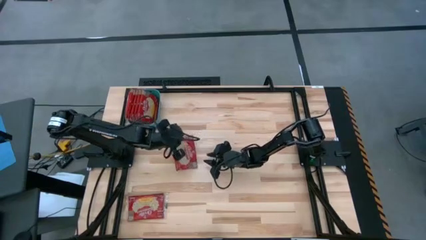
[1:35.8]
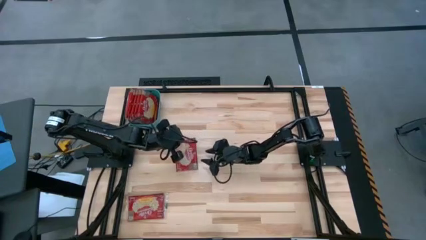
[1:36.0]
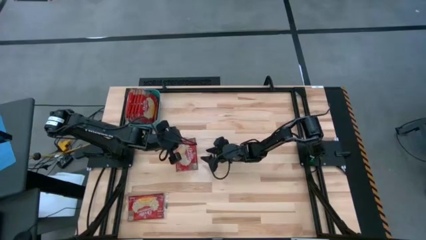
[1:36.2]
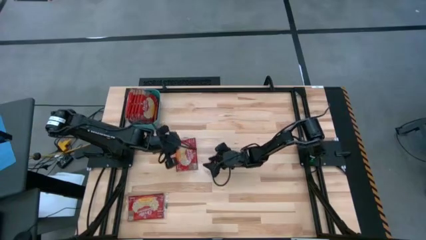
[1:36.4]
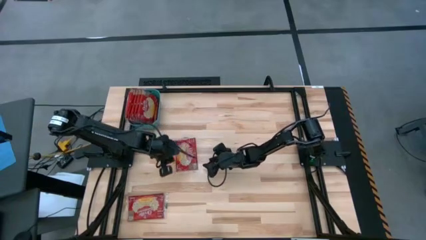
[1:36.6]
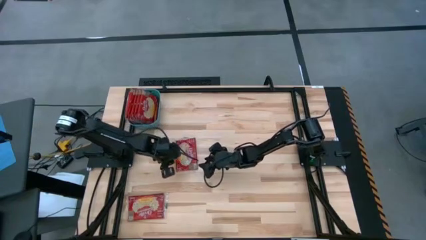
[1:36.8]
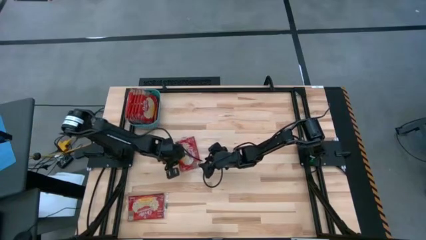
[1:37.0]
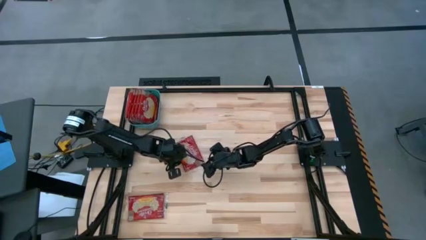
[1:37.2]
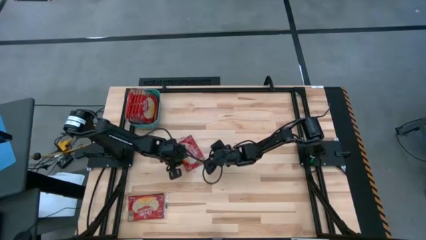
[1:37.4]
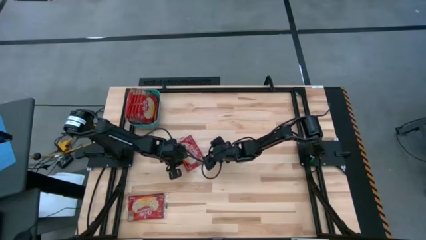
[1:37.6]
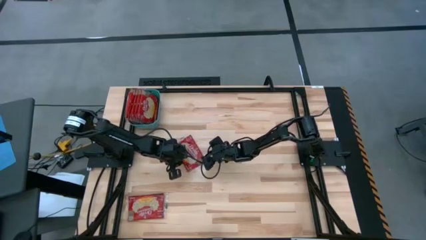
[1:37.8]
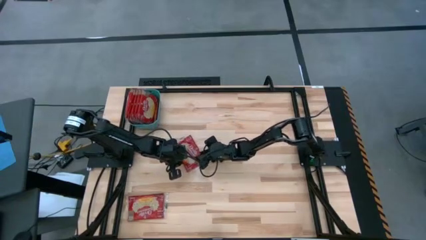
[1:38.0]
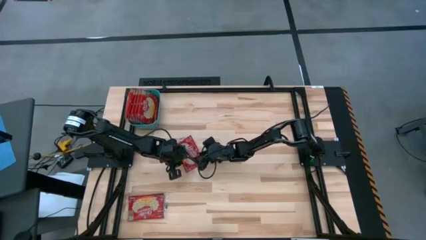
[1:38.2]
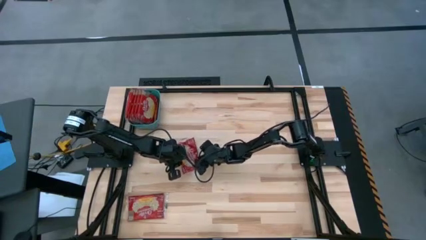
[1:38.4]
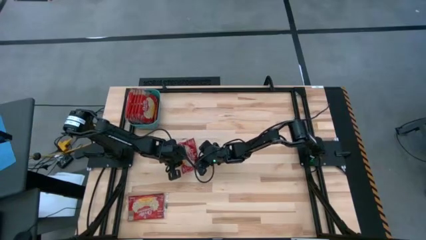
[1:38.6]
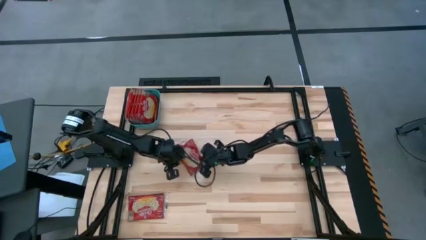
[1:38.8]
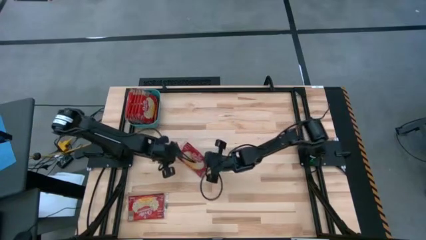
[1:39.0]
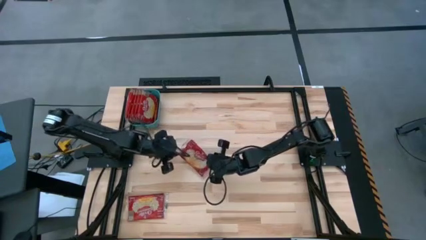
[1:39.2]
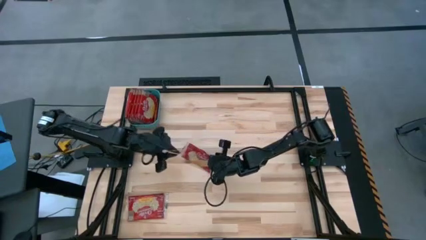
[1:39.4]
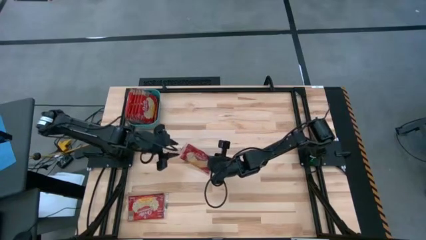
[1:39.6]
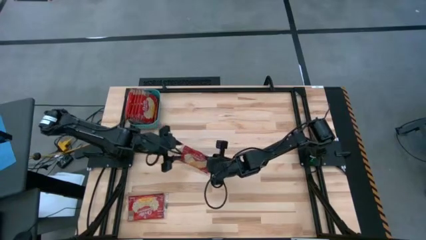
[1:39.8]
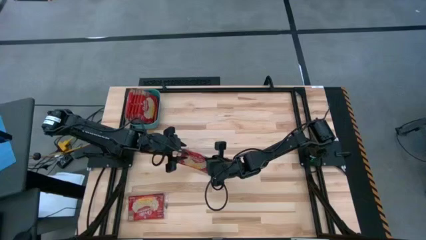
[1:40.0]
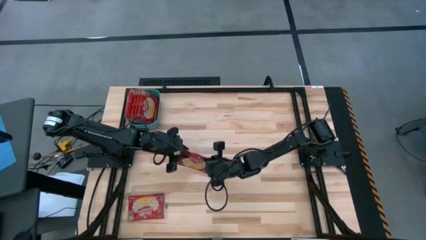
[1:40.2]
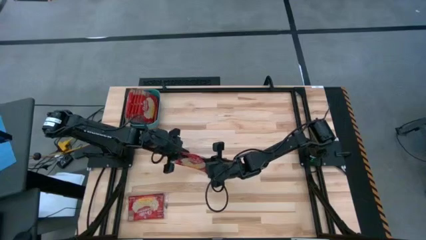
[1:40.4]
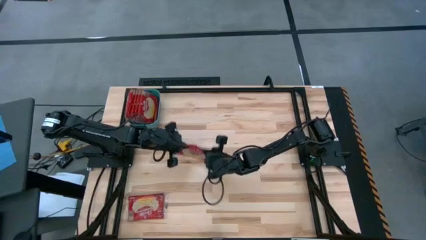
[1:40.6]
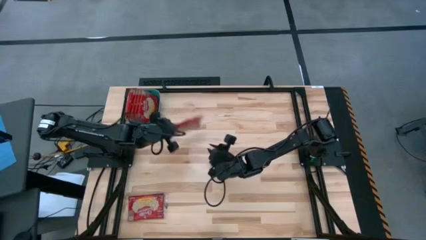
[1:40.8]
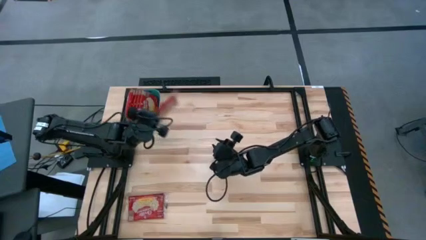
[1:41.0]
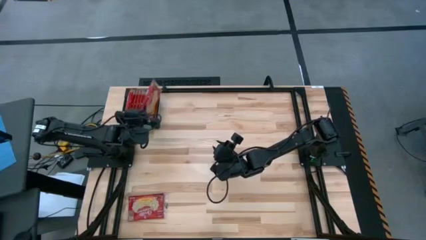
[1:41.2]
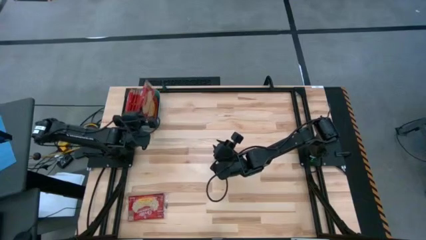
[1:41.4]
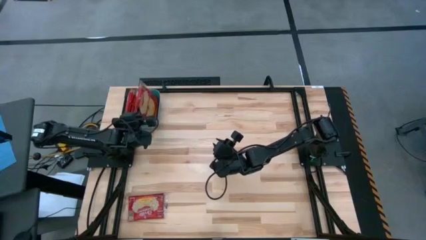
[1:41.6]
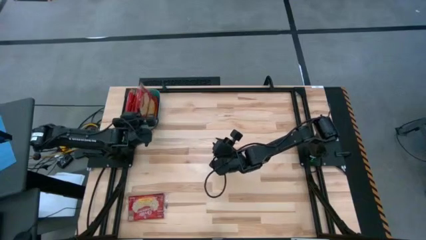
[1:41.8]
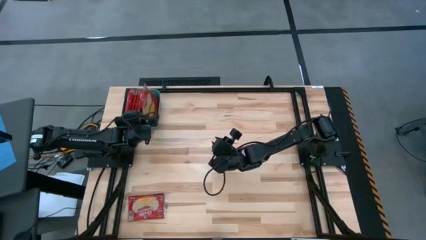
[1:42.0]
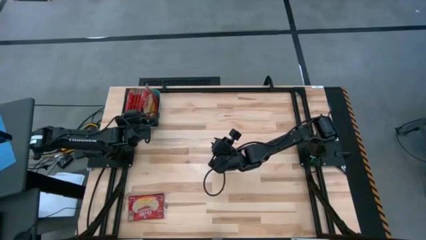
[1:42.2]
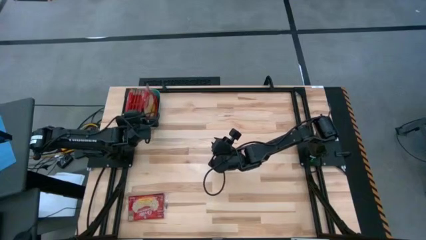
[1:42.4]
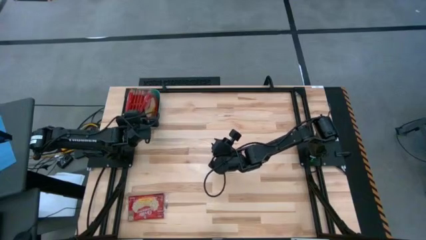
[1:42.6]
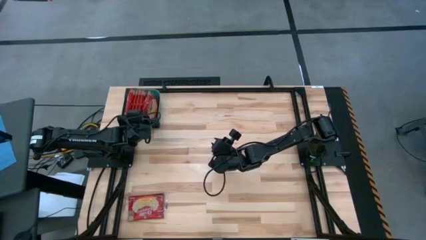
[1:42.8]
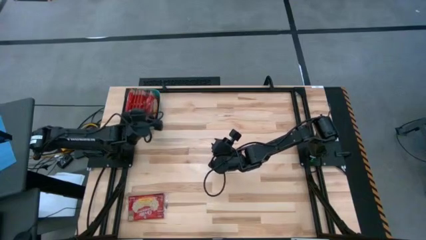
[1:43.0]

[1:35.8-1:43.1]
Task: Sort popcorn bags into baskets
Put the red popcorn bag in the blue bin

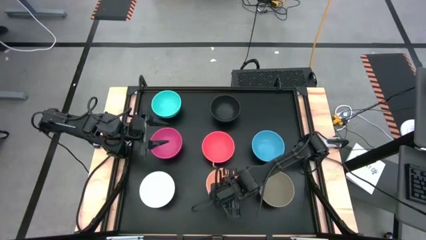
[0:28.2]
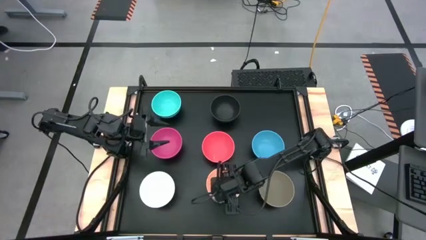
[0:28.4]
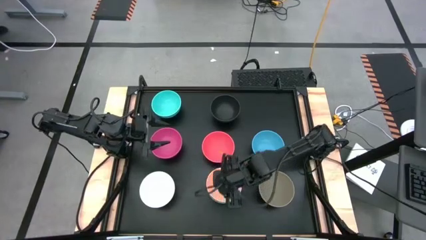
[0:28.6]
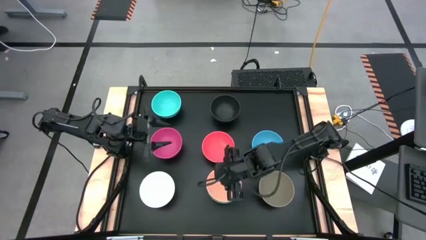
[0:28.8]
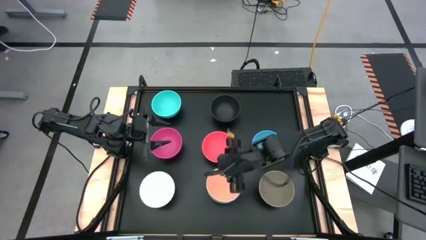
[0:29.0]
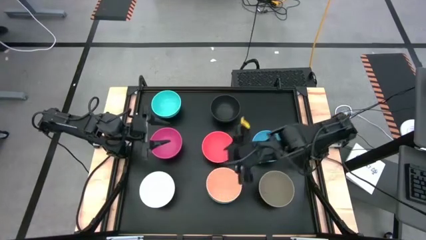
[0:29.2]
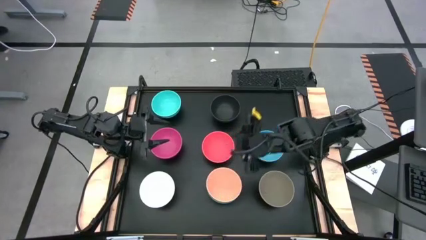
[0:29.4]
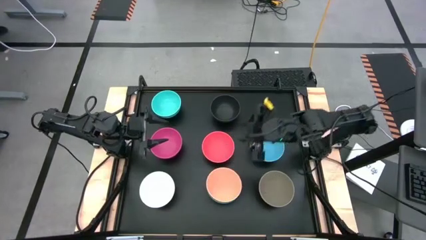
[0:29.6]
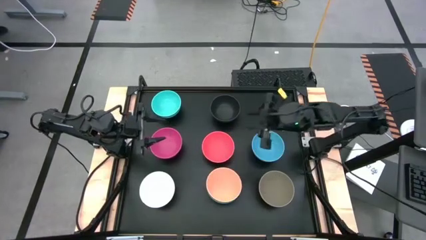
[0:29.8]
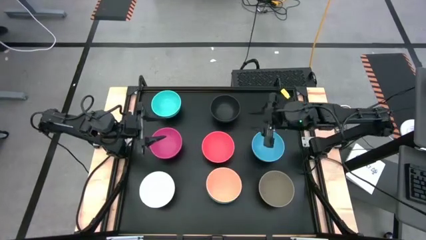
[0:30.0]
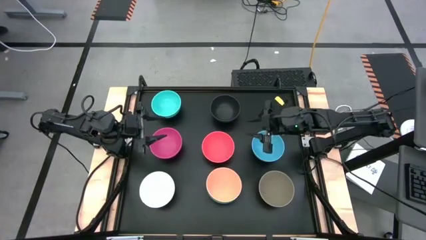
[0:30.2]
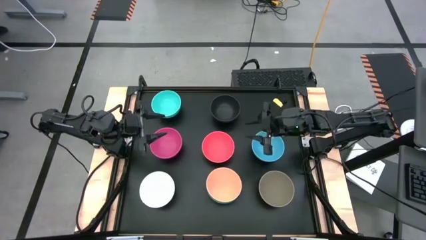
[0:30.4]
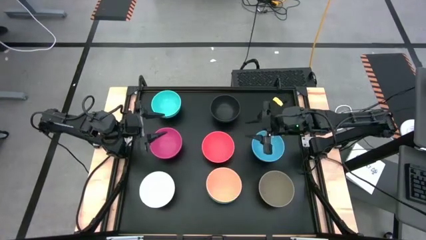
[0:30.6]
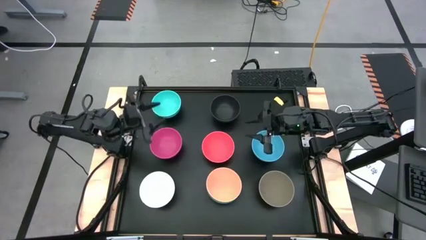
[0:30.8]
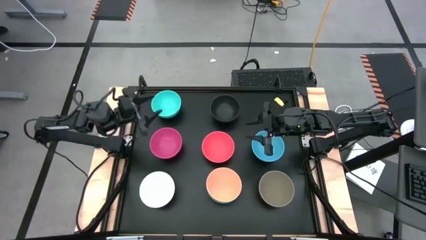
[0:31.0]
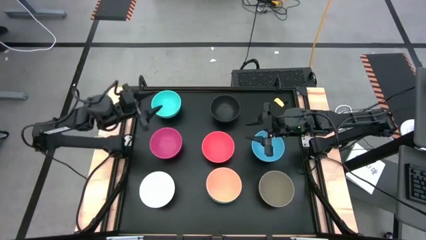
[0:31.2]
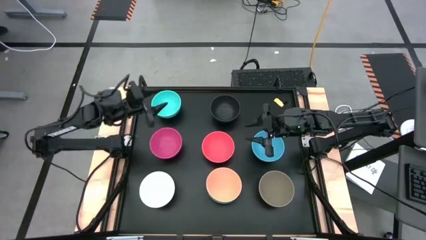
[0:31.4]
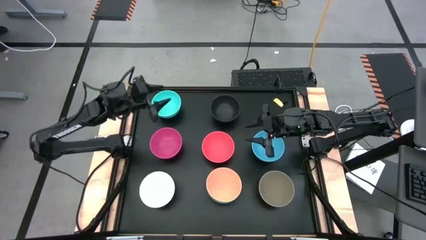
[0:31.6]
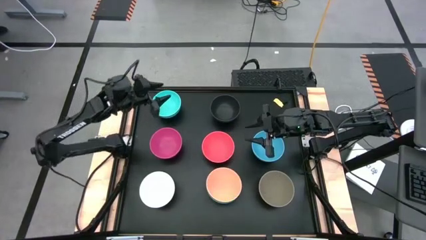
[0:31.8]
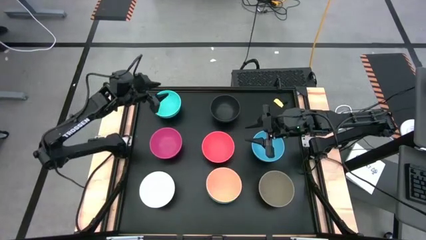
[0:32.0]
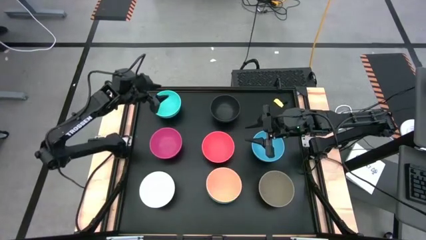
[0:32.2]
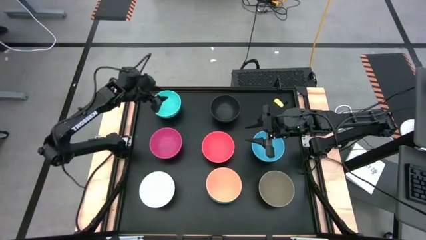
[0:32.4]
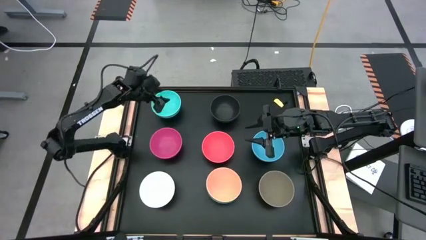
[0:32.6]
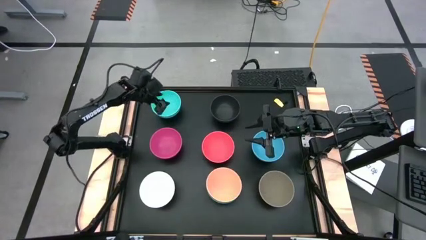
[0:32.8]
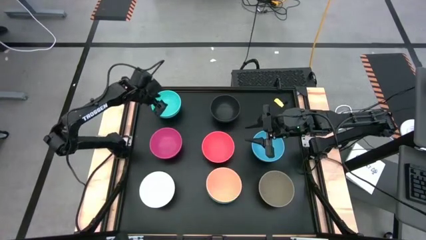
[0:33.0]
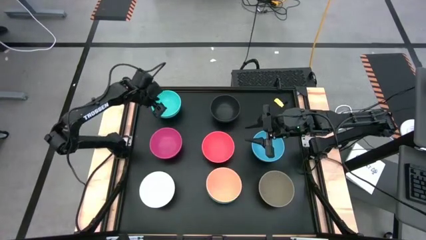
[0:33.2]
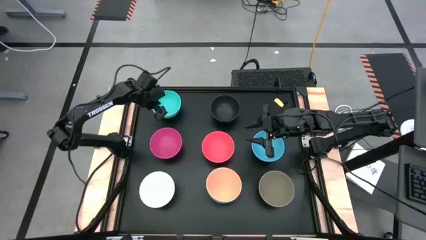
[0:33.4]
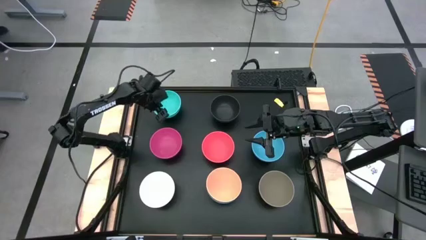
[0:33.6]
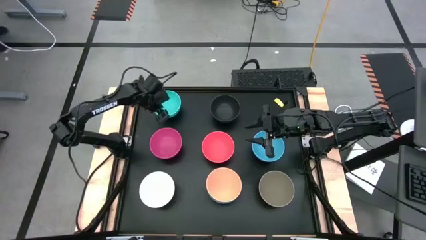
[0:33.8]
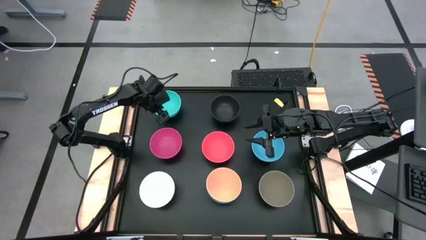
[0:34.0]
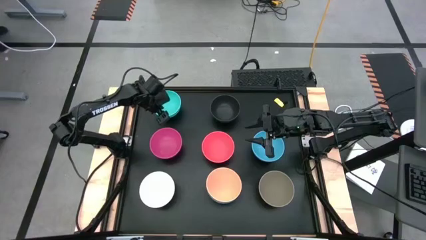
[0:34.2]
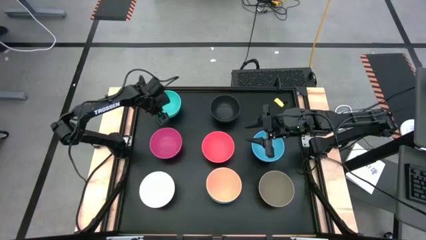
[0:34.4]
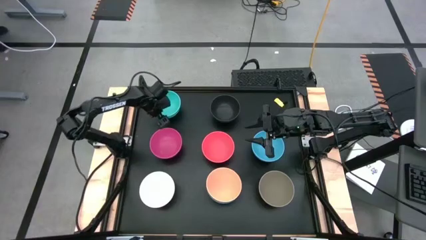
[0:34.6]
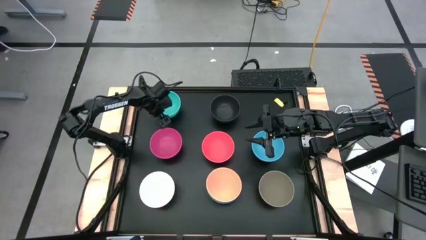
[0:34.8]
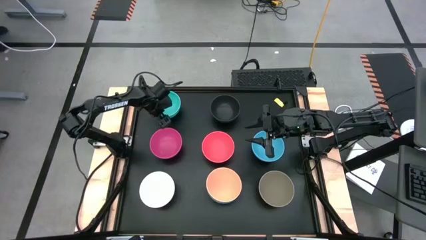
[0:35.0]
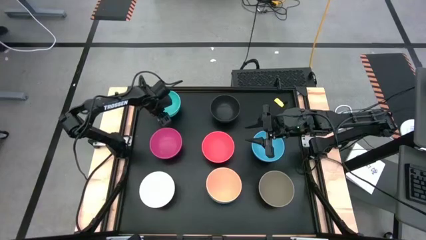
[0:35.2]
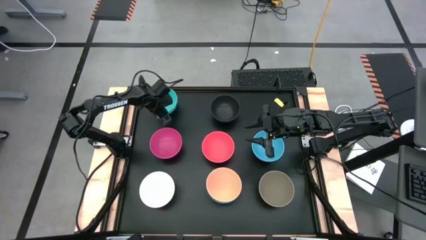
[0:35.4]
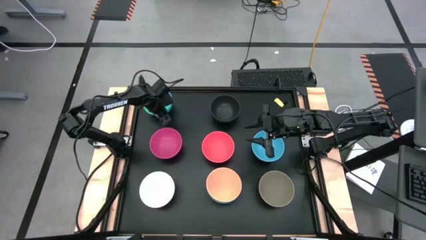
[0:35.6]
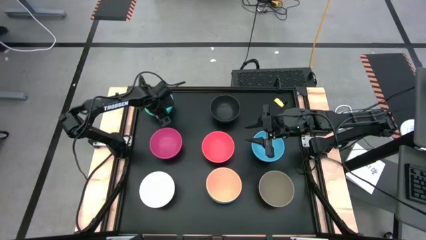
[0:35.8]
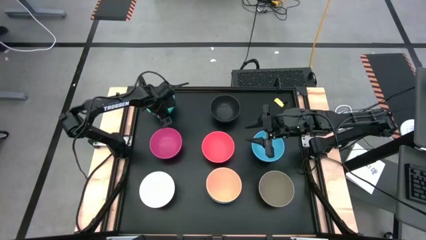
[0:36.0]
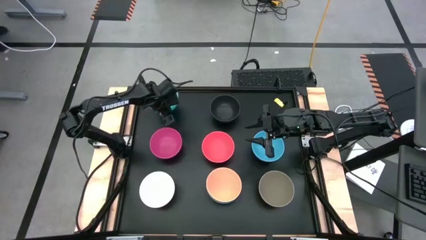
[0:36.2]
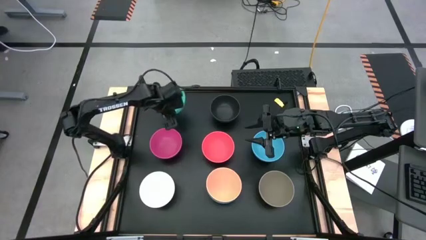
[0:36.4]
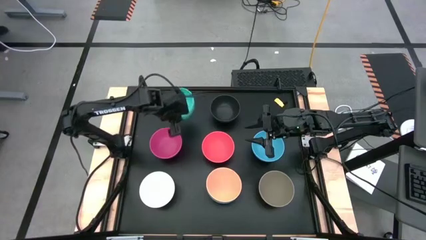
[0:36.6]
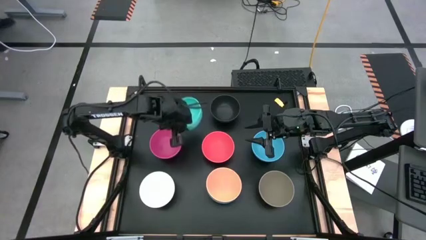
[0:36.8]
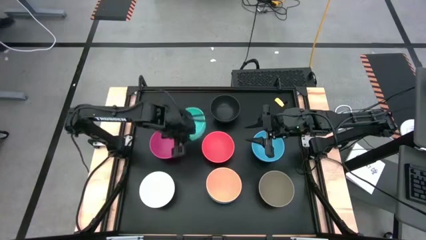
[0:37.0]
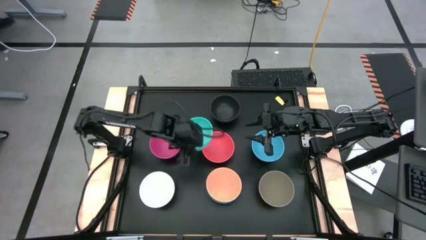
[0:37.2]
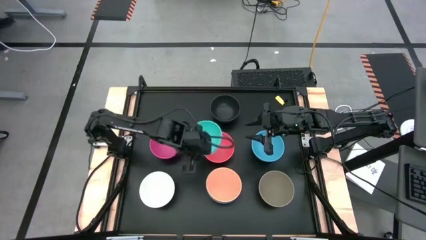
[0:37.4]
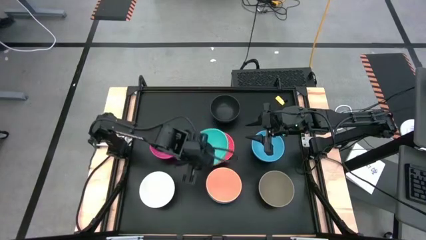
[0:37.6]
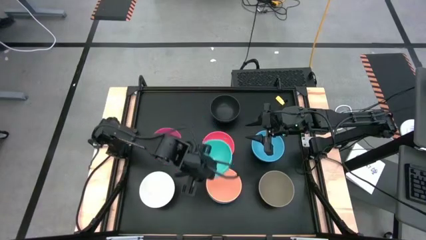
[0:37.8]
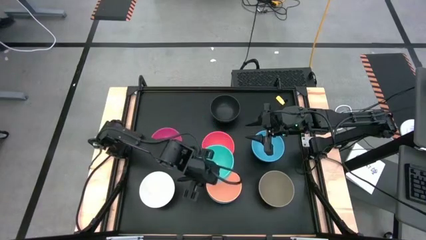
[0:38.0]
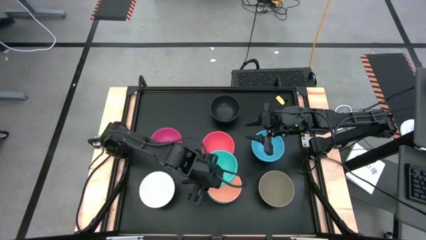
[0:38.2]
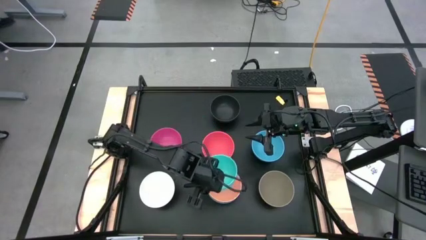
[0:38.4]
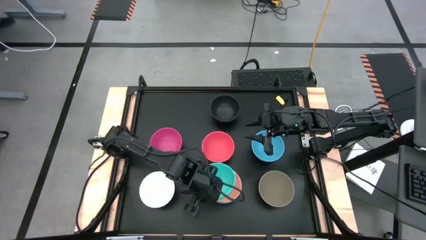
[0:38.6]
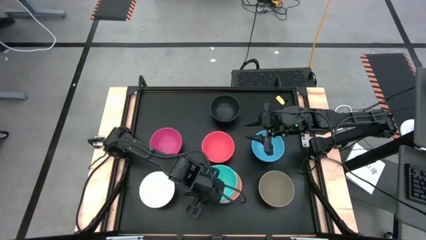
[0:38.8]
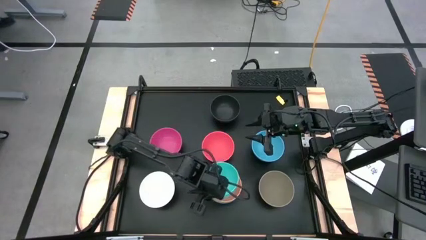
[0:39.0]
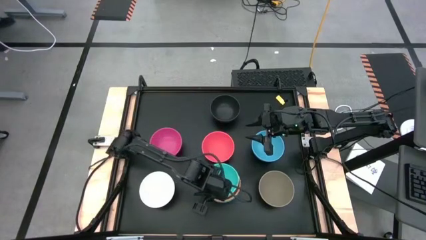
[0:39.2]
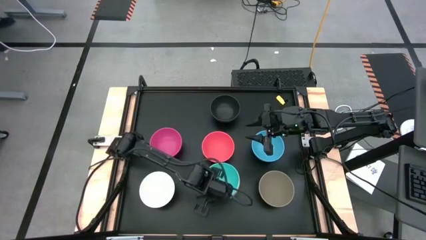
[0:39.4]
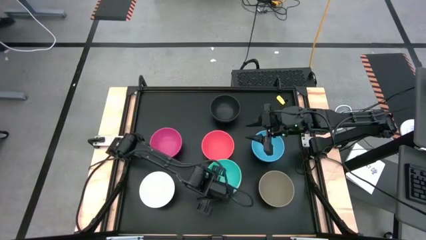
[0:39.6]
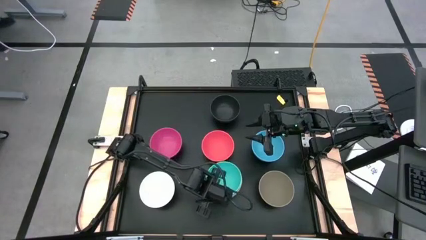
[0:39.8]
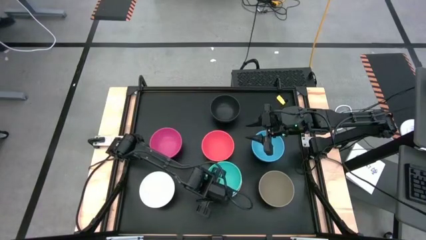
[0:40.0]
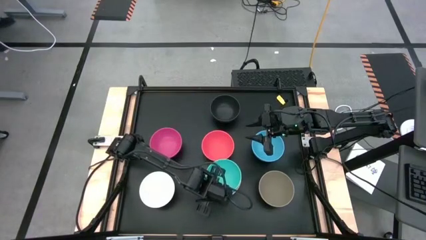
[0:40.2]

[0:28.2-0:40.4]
Task: Nest bowls inside each other
Stack the light blue bowl on top of the light orange bowl
